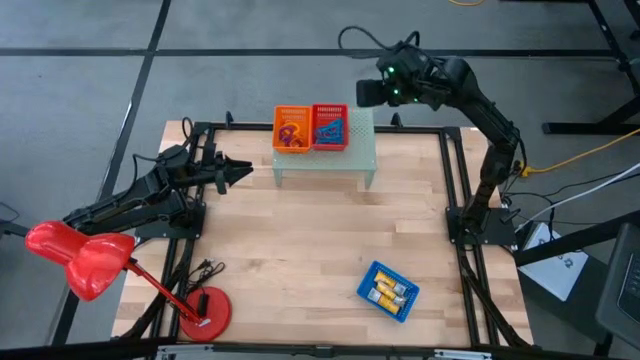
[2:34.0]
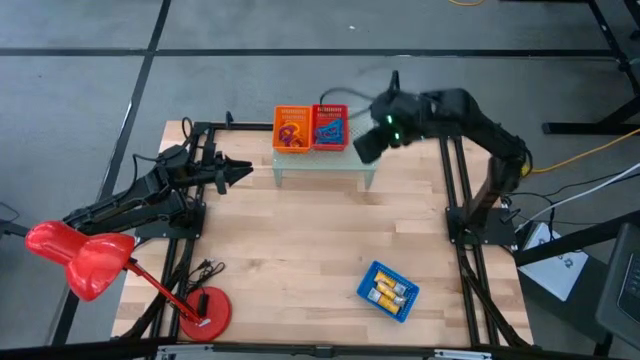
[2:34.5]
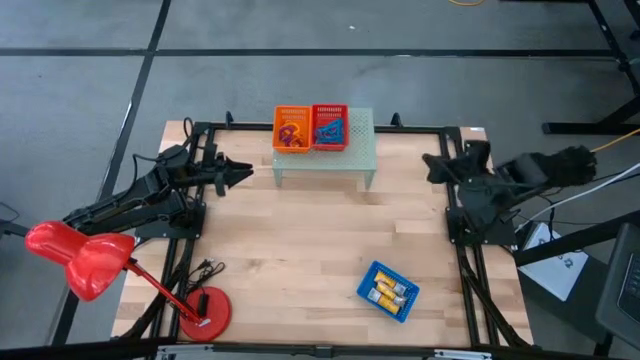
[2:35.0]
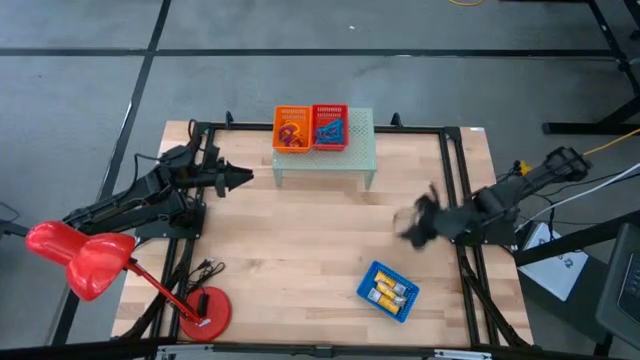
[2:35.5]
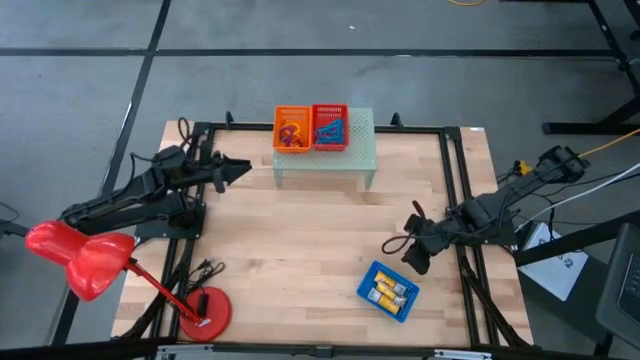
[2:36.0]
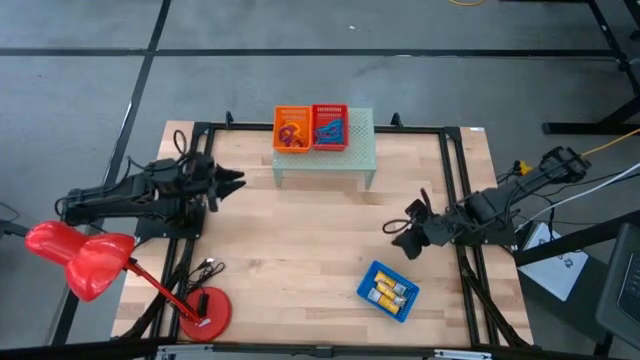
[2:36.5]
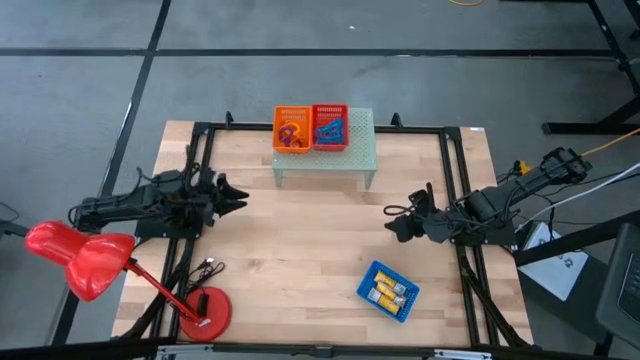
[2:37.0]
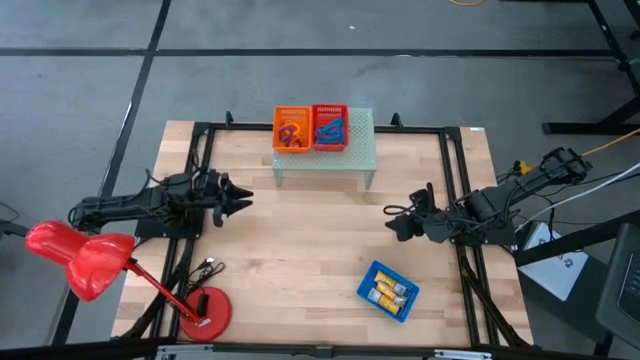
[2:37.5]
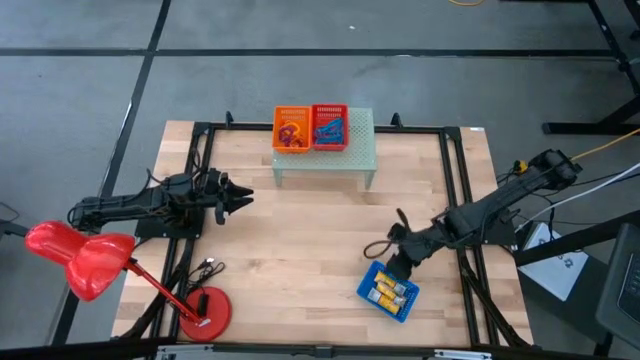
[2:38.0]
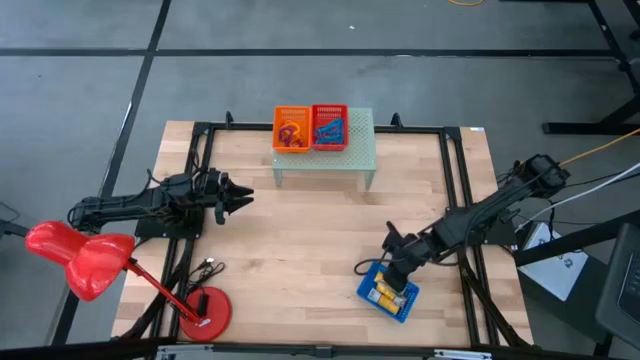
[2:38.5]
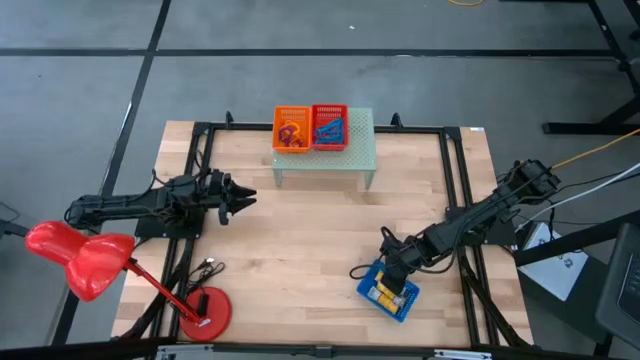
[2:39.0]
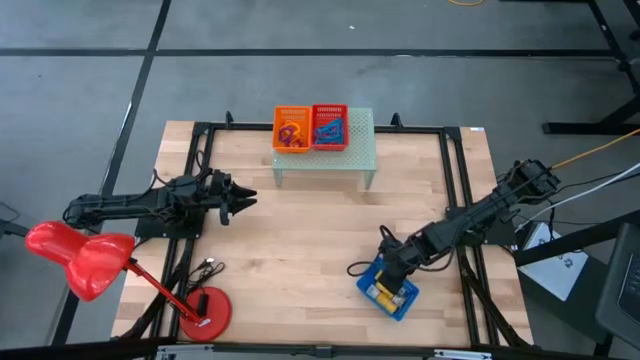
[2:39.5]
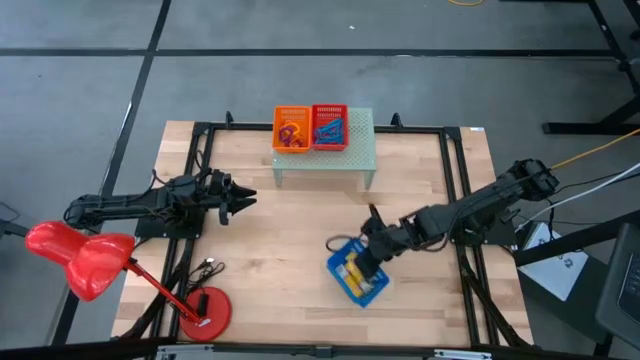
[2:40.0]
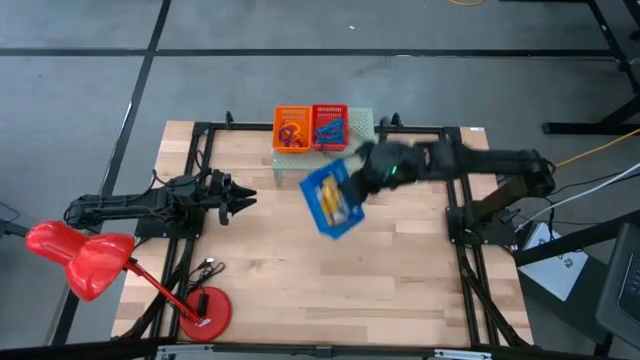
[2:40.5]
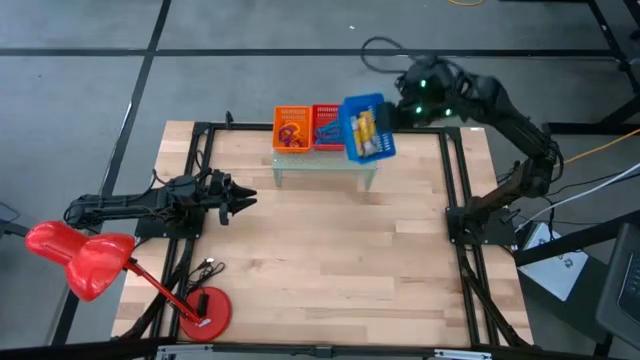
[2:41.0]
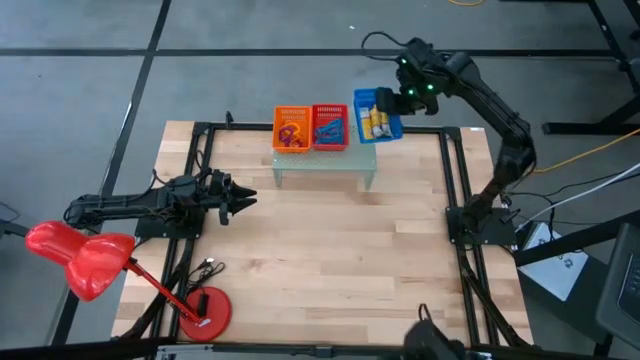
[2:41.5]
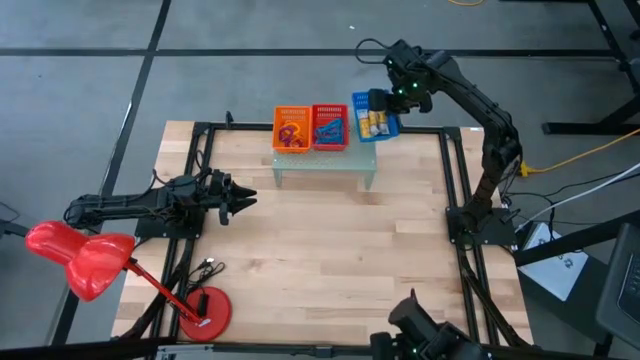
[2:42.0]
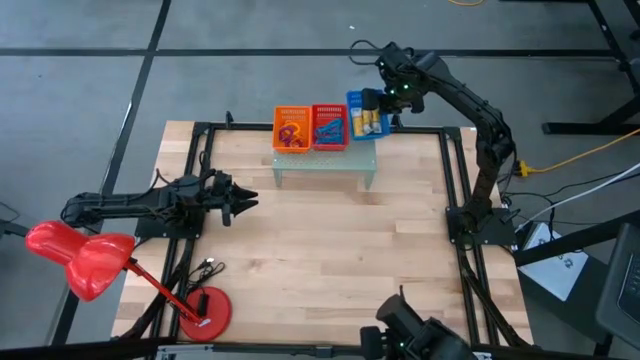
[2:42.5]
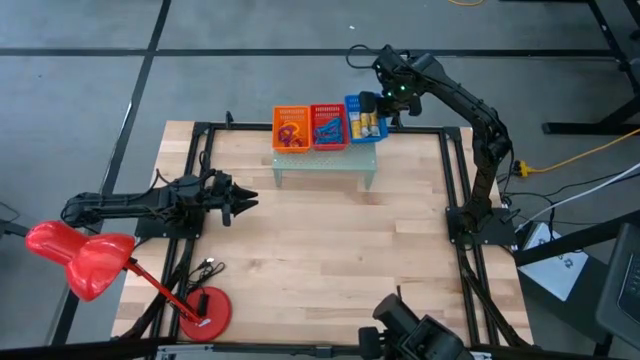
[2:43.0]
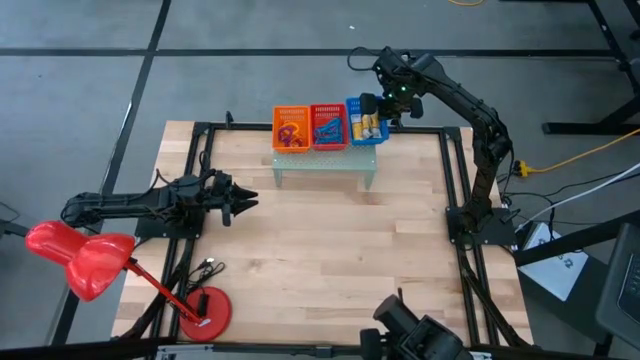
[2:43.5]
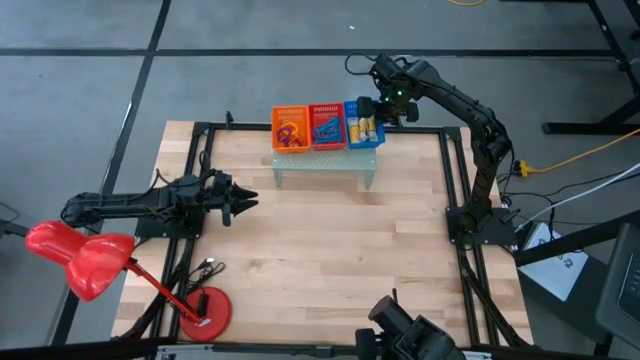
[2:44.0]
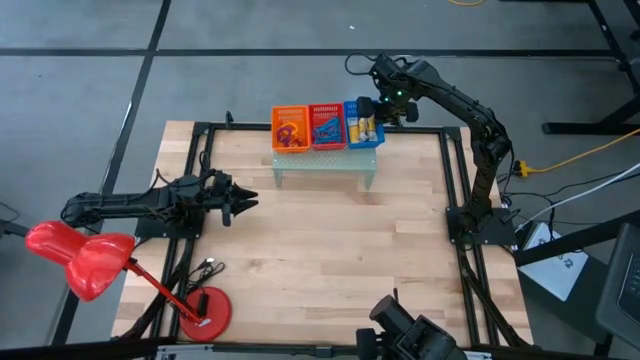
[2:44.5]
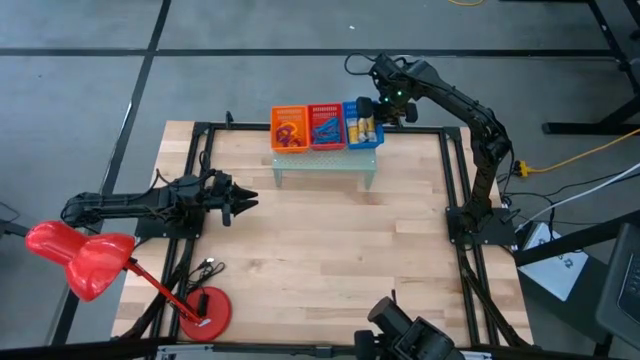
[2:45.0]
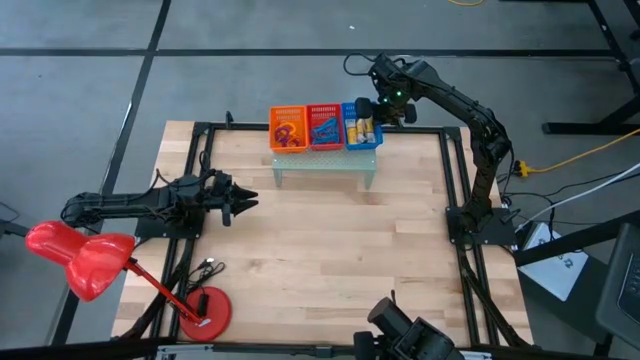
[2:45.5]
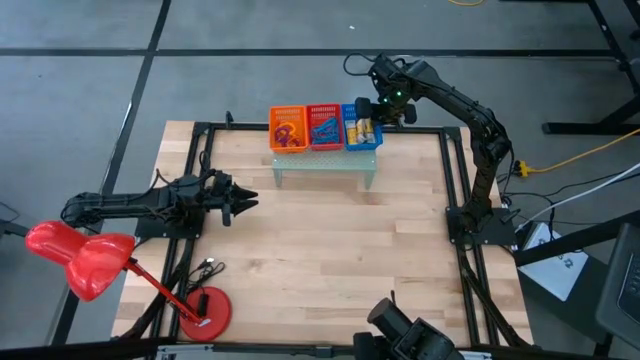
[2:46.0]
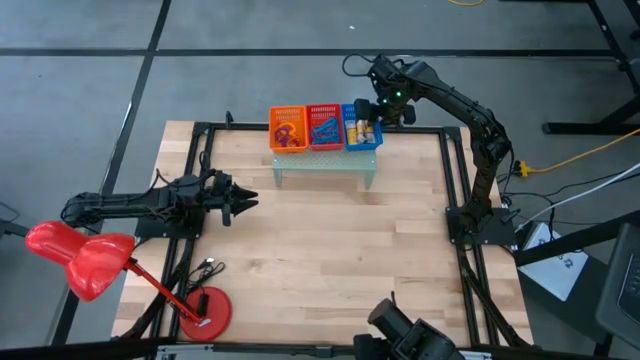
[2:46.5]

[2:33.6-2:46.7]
Task: Pick & Place Office Desk Supplies
Put the blue basket with crayon boxes on the shelf

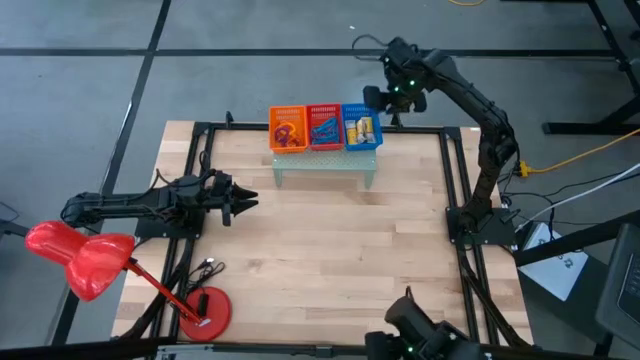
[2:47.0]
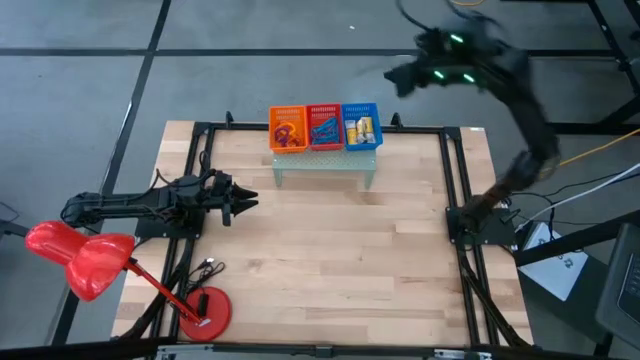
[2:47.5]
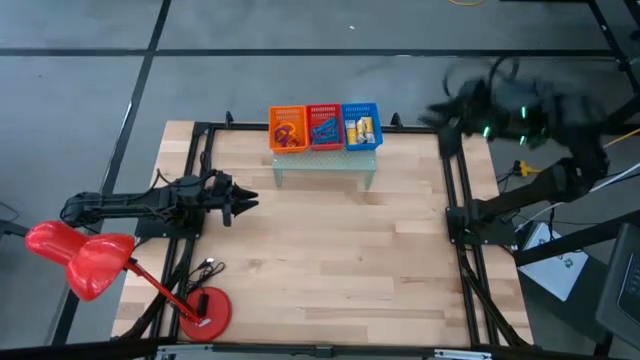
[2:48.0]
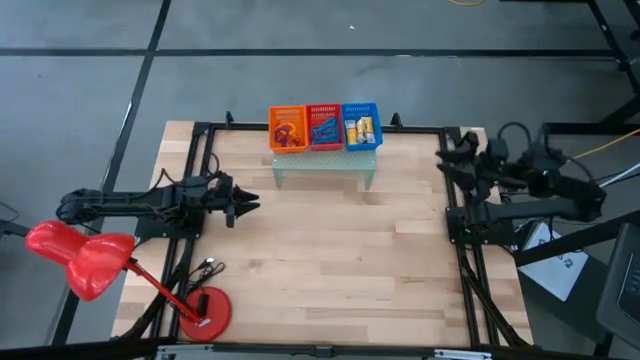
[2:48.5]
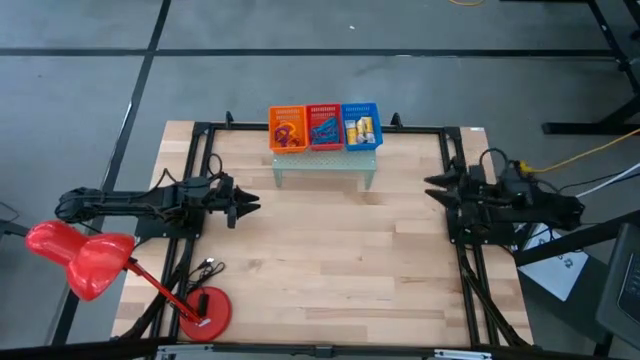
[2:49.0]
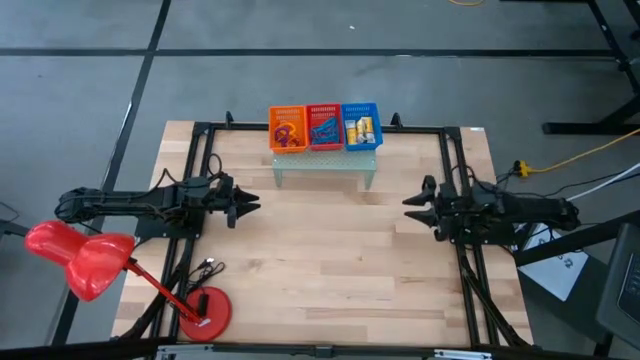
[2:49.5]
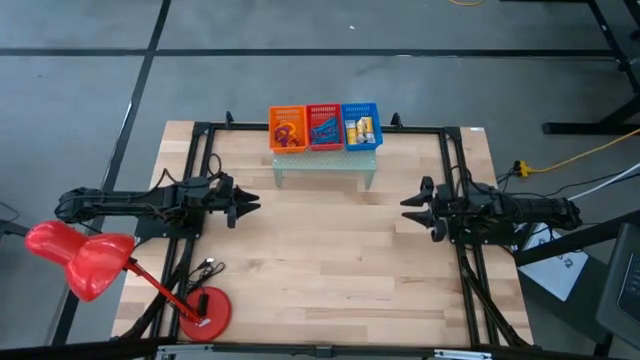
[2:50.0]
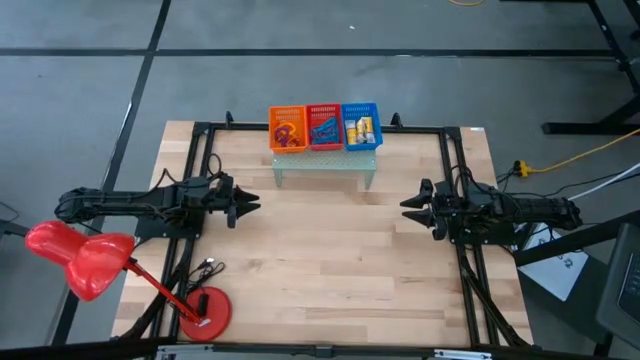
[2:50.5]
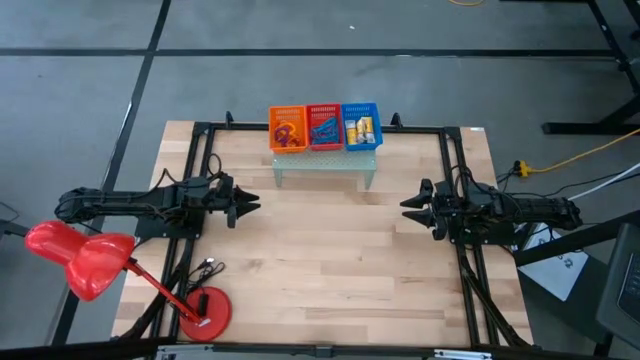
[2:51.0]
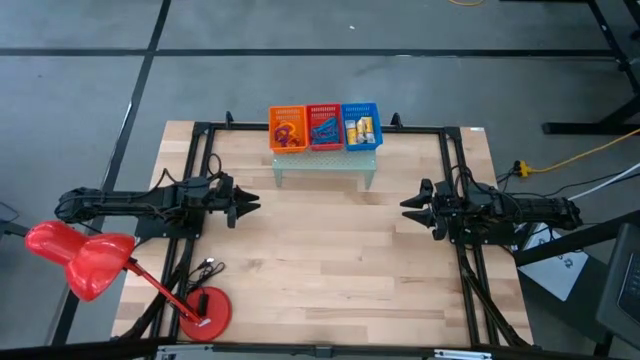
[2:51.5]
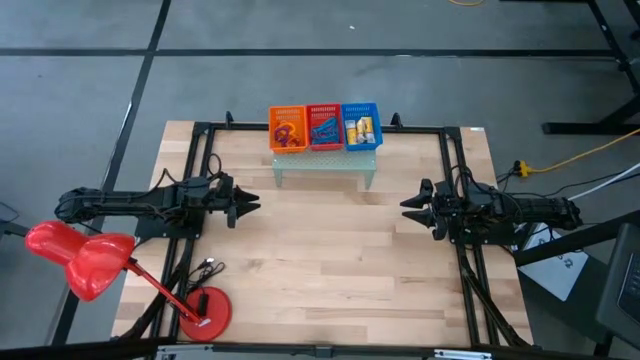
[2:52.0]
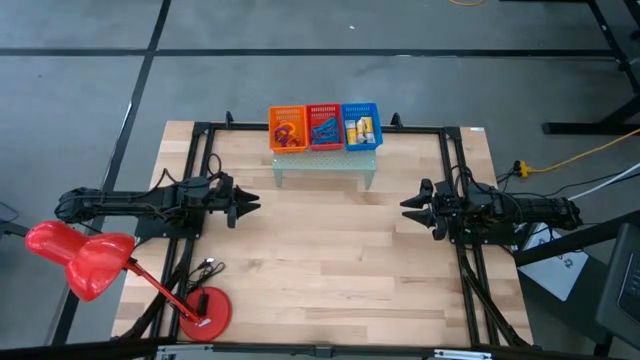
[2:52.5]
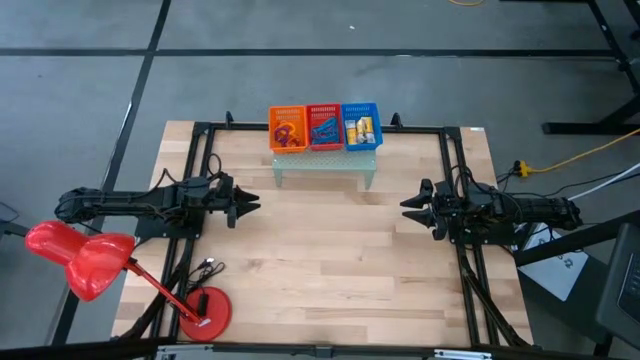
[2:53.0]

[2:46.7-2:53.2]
Return to Home Position

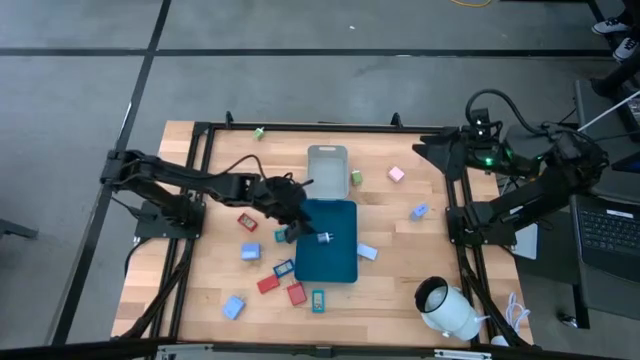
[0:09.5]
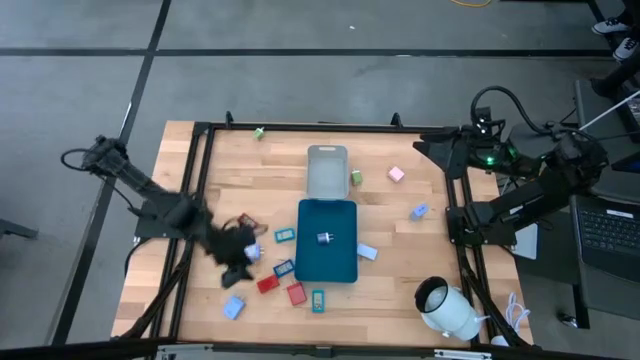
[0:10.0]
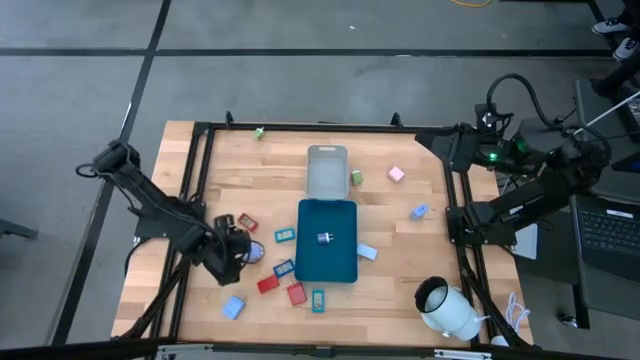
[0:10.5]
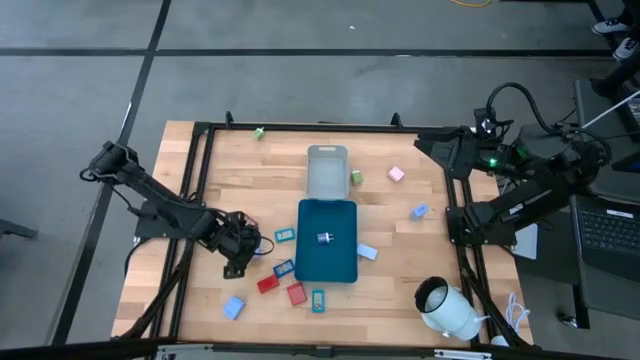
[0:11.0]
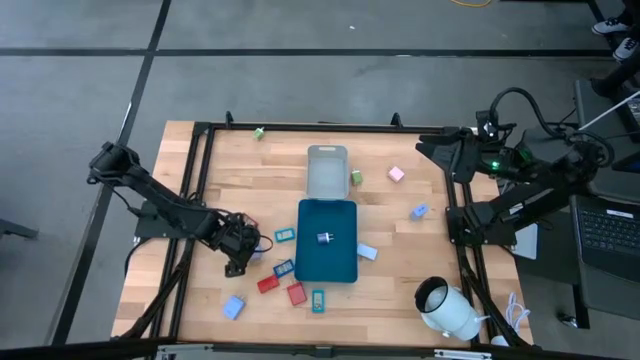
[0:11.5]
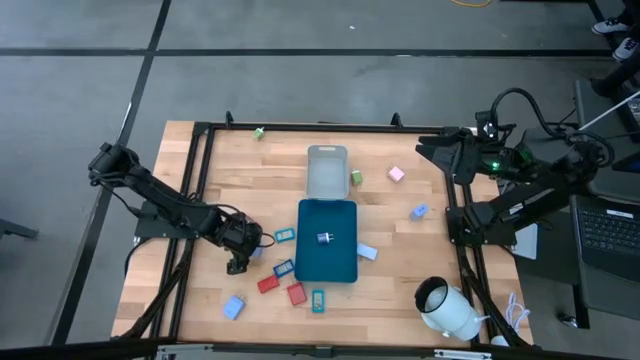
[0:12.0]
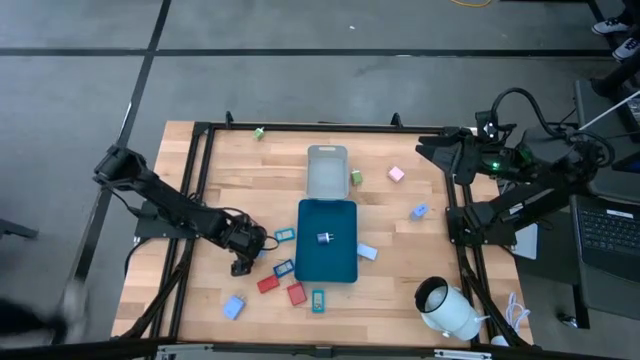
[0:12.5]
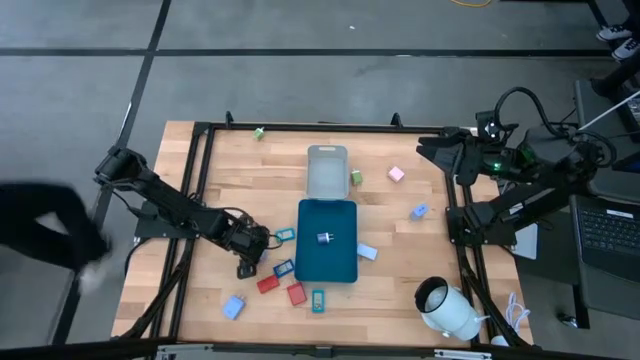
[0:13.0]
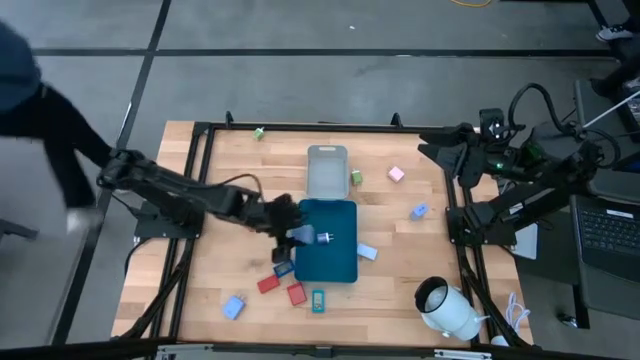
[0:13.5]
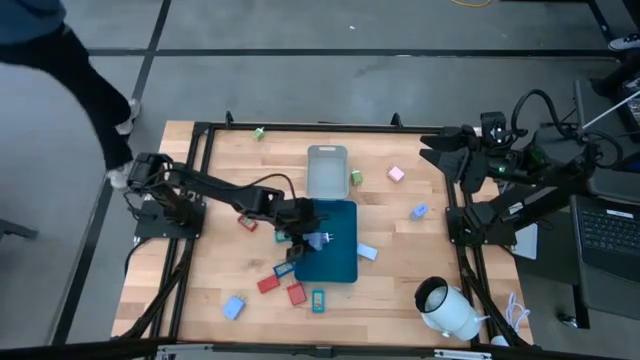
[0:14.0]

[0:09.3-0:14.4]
Task: Pick & Place Office items
Put the light blue charger adapter into the blue bin
